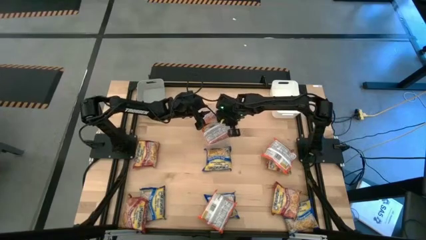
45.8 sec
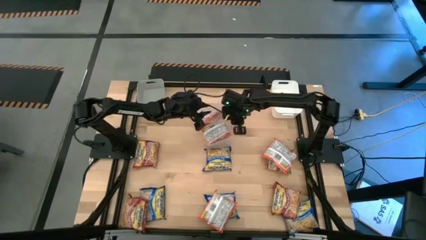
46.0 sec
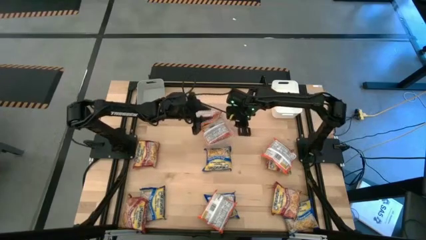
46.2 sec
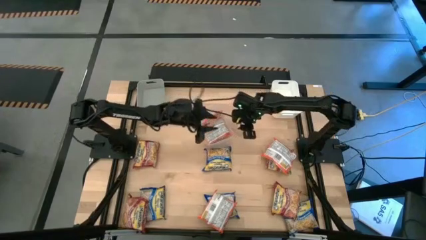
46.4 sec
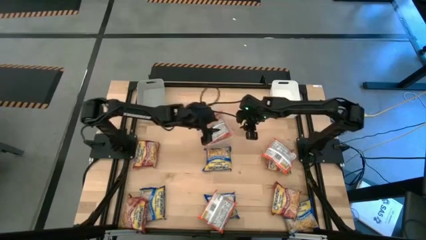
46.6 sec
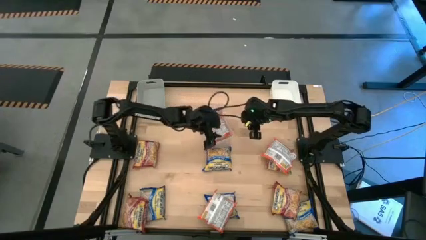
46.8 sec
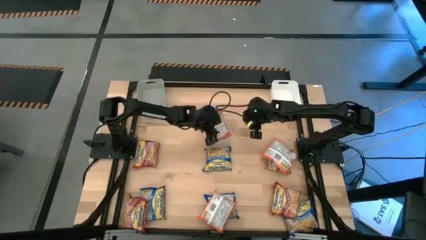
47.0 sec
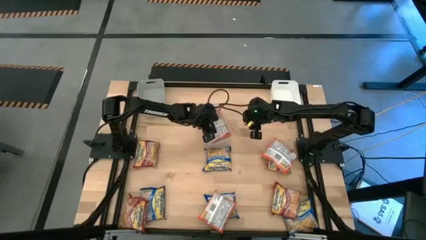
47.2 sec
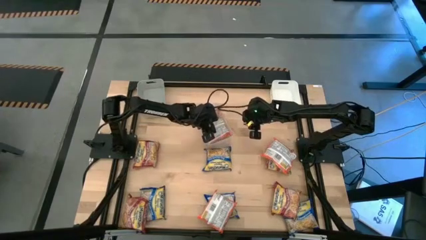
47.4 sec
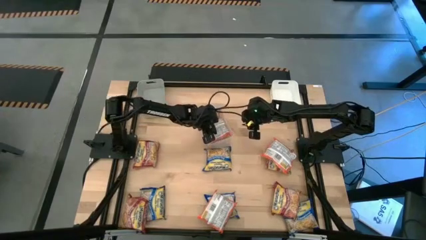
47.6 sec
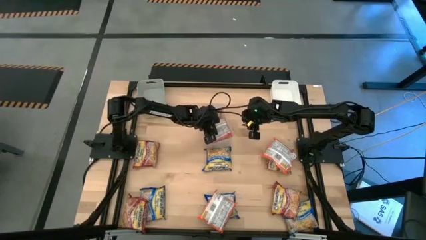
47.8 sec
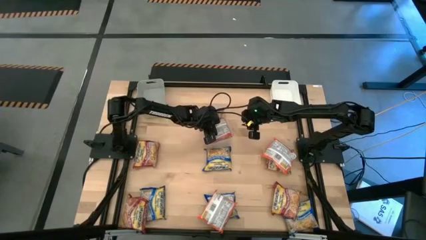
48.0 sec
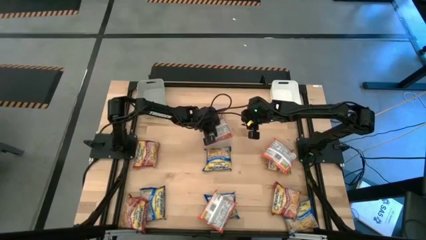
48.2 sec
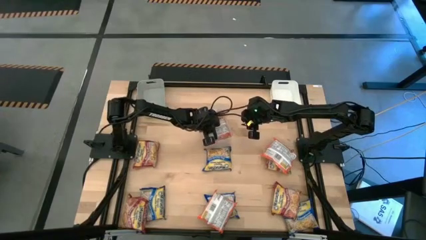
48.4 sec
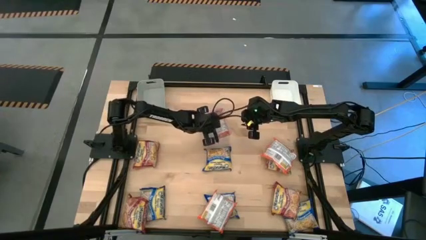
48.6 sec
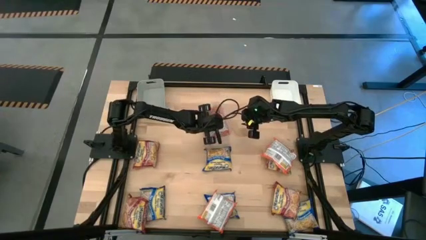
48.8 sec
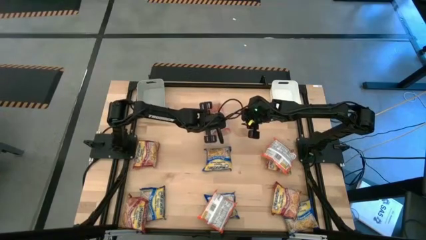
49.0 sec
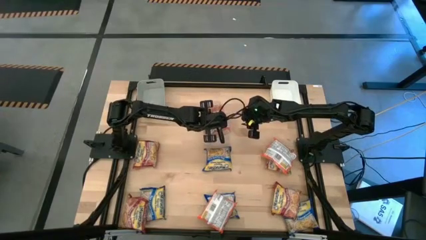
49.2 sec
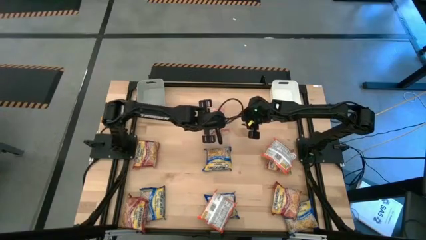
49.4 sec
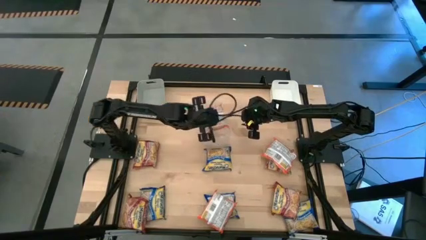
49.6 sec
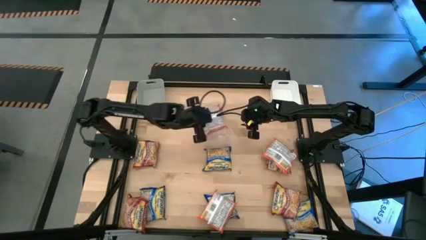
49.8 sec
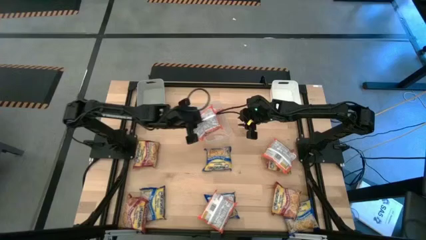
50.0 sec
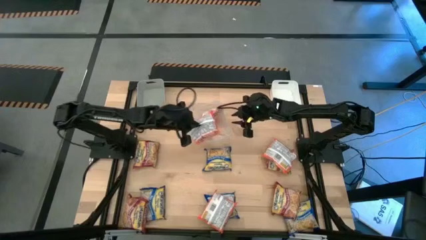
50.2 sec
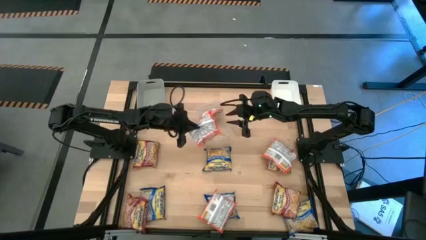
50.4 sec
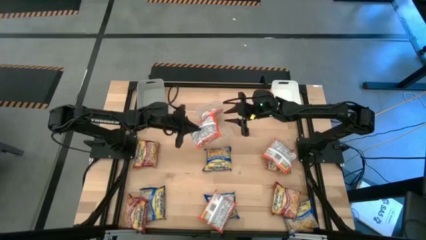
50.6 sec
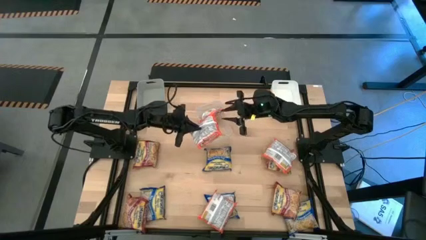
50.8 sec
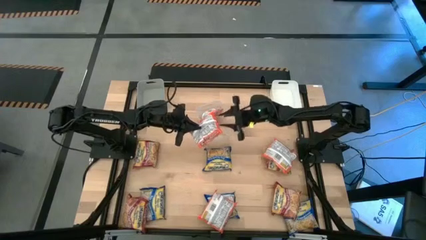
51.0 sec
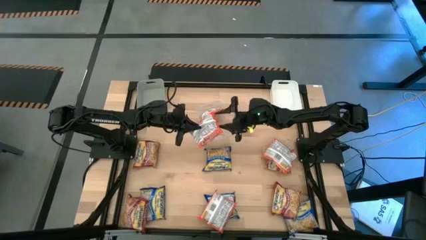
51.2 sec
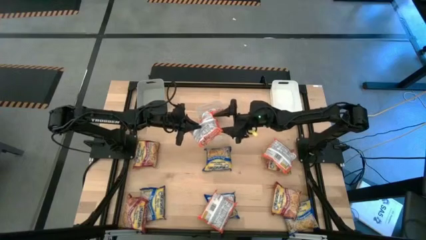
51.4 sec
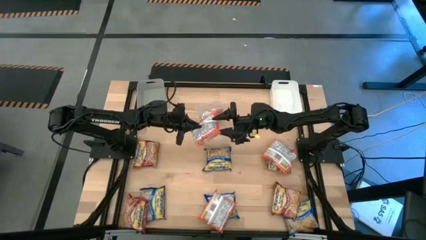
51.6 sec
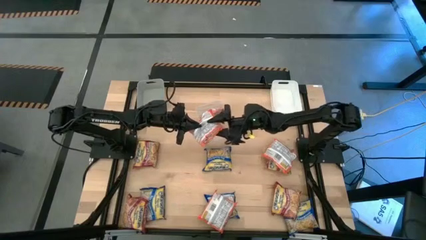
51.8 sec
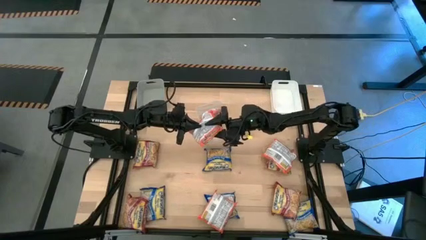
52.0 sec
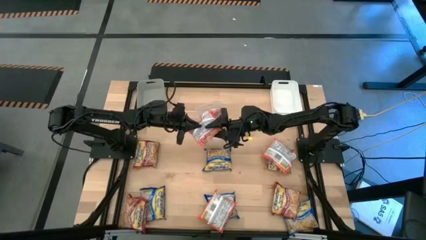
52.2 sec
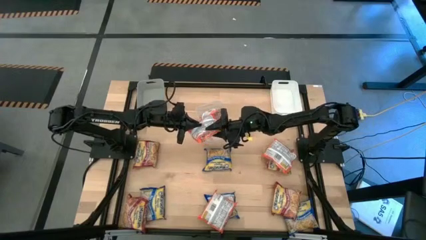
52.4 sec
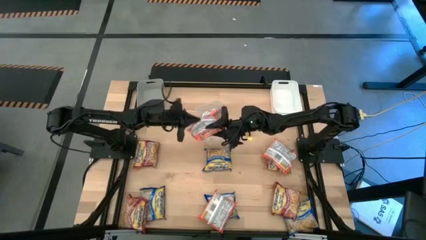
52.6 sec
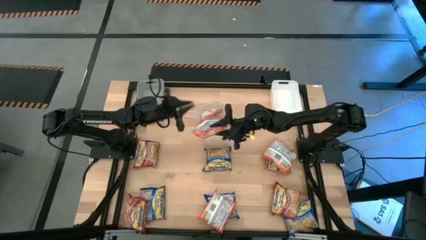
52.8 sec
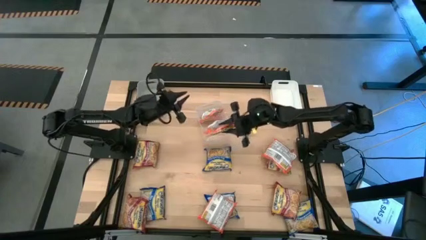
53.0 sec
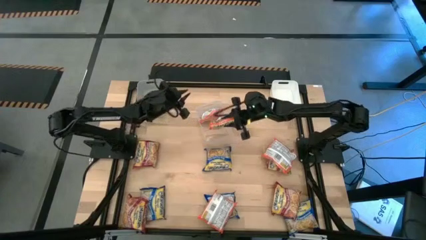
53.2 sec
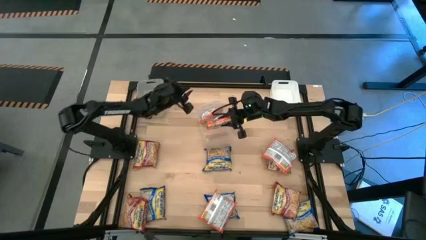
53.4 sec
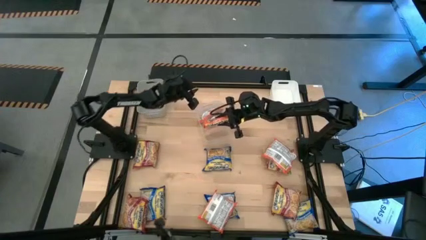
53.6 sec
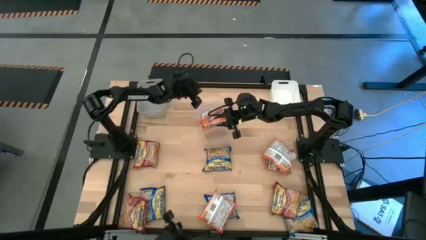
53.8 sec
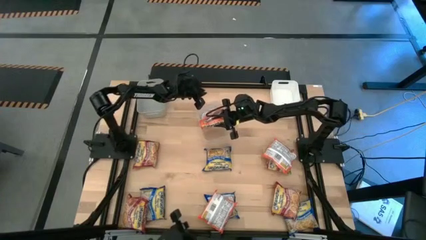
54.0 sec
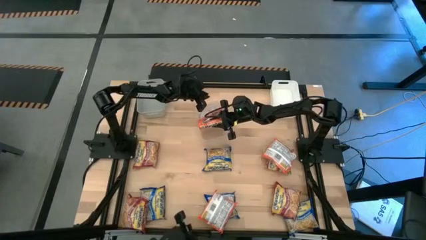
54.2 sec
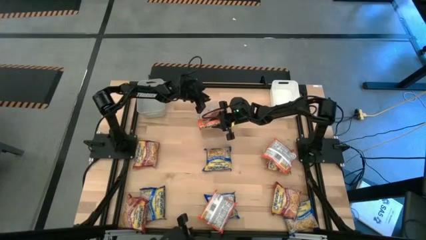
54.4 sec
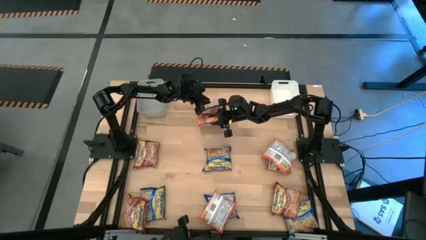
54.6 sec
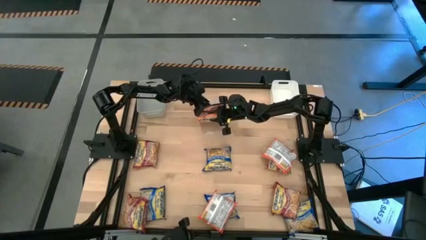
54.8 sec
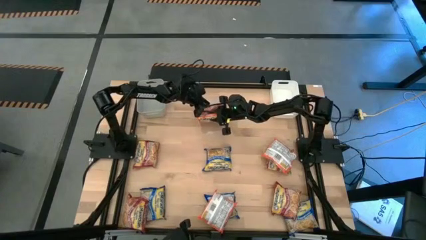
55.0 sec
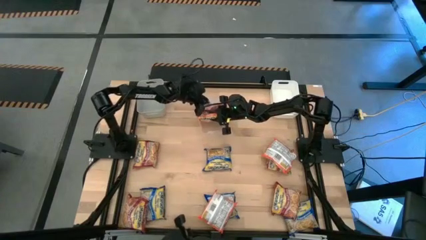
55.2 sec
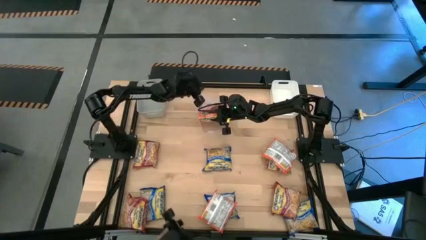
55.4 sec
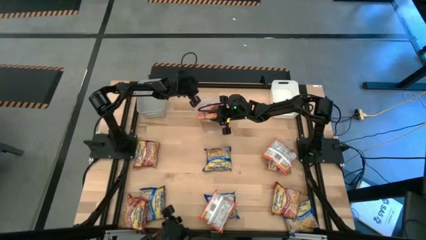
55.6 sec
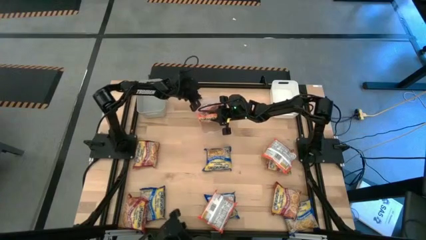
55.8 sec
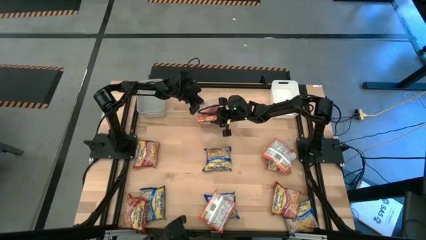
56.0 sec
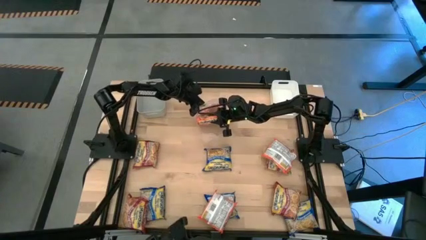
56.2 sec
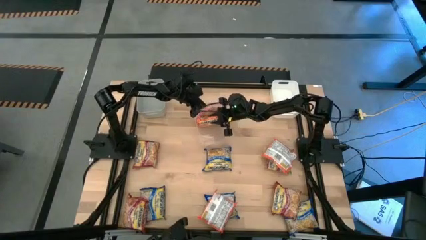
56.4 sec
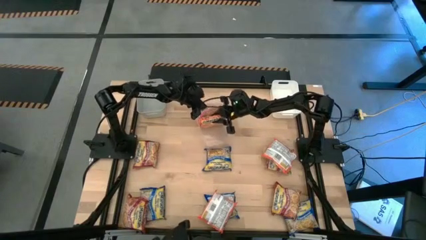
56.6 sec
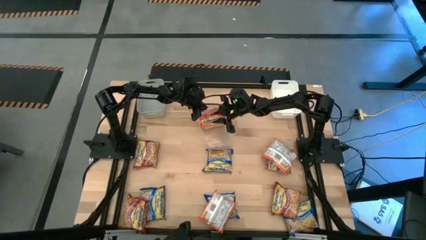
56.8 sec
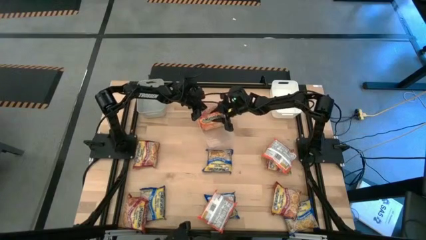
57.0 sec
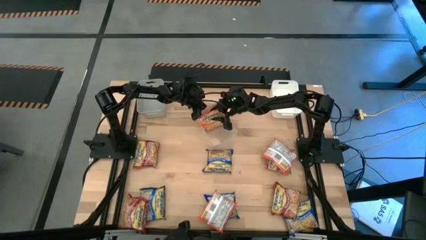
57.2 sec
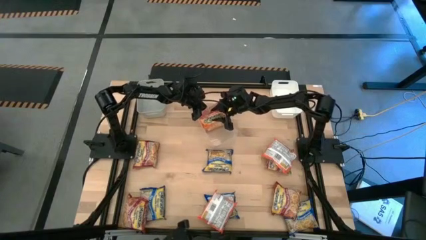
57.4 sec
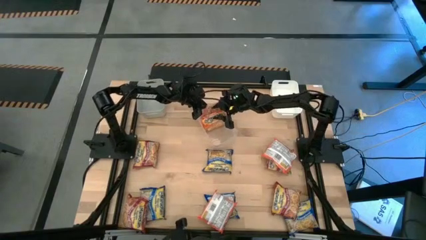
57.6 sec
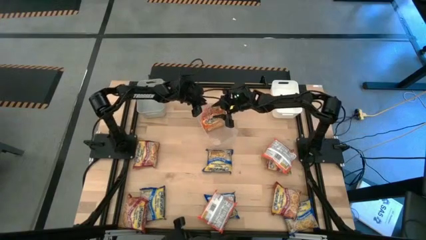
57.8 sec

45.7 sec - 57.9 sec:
Task: Sort Maruchan noodles
Adjust the orange noodle on the transparent bin

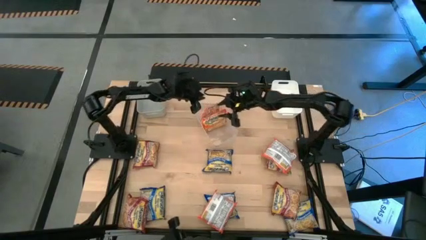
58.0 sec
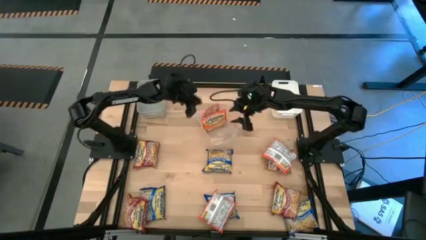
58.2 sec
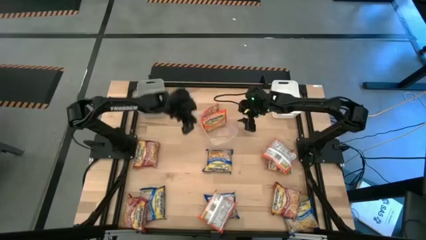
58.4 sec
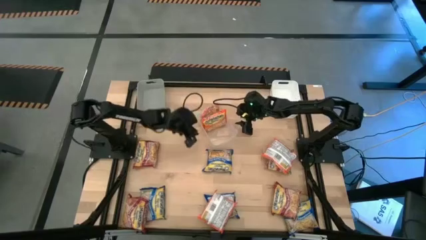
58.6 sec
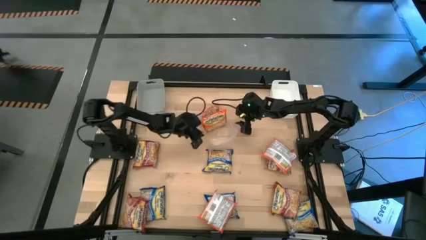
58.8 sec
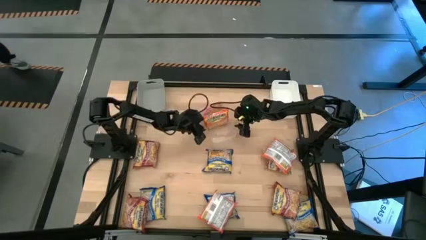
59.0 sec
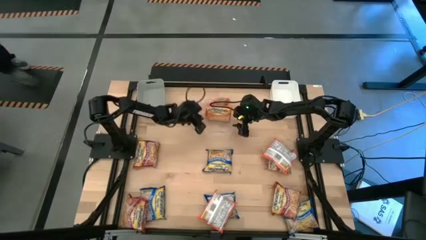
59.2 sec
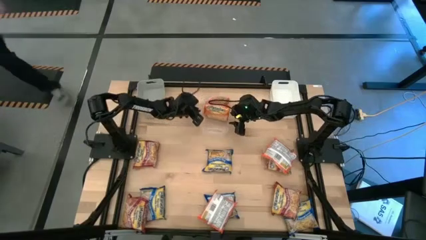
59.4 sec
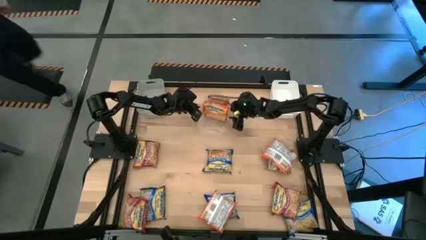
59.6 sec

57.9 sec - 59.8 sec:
Adjust the transparent bin

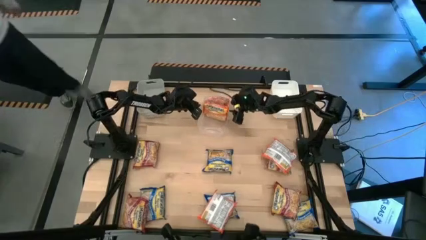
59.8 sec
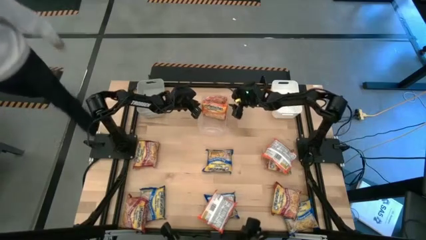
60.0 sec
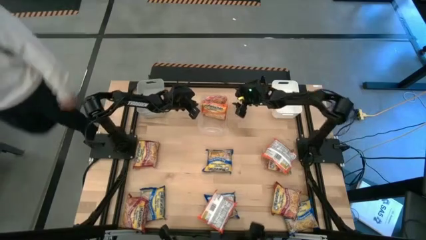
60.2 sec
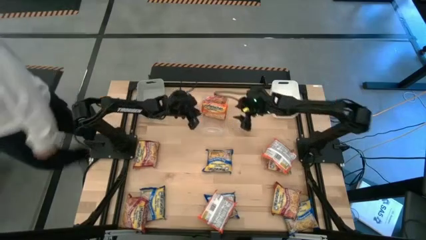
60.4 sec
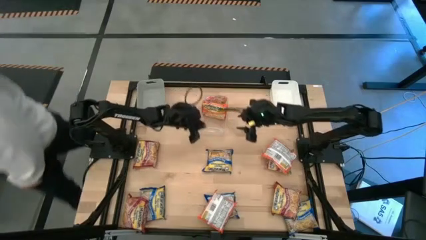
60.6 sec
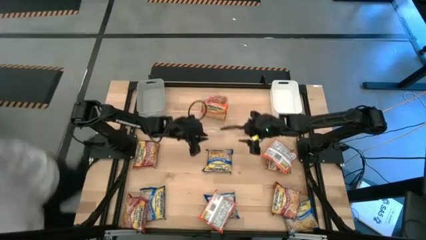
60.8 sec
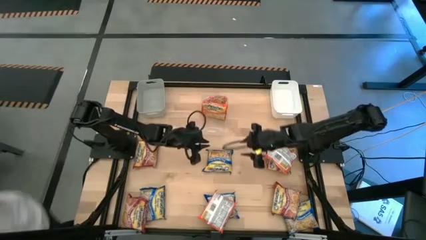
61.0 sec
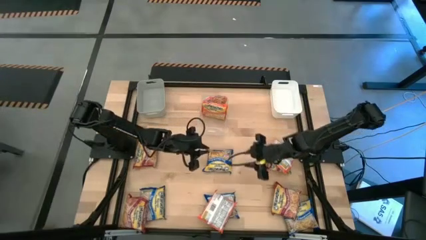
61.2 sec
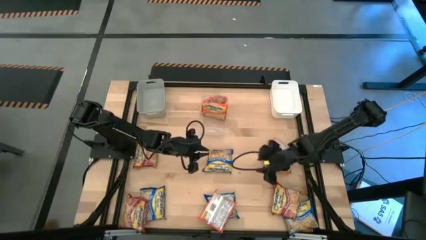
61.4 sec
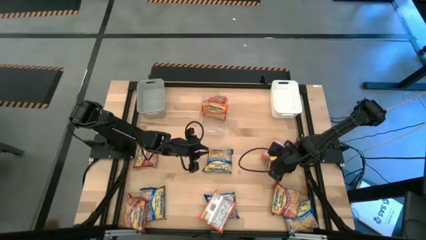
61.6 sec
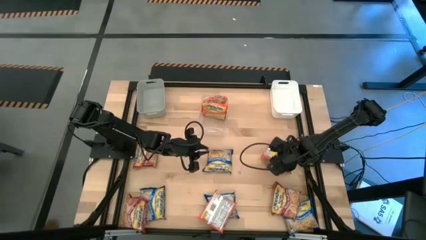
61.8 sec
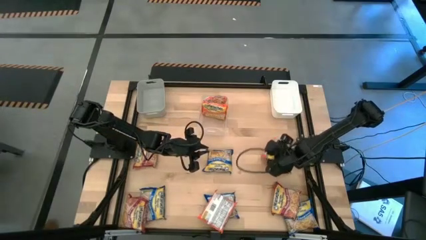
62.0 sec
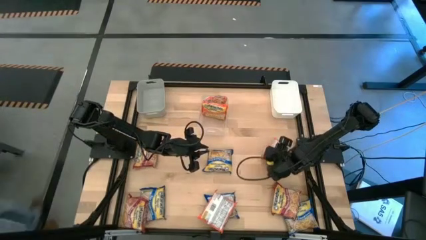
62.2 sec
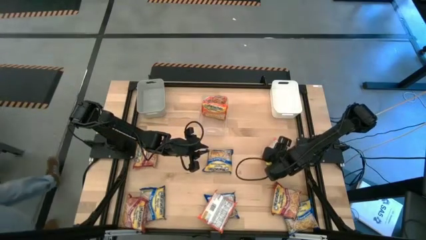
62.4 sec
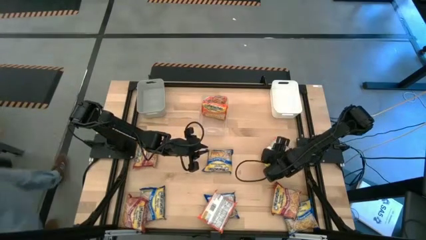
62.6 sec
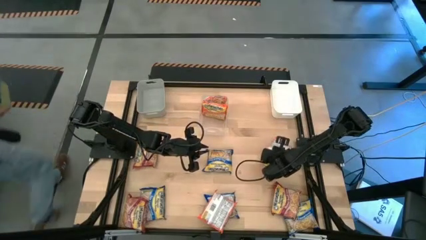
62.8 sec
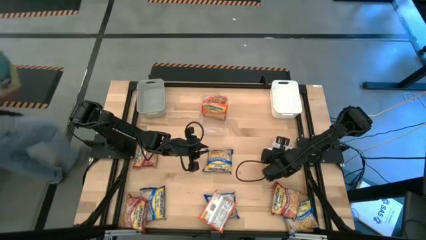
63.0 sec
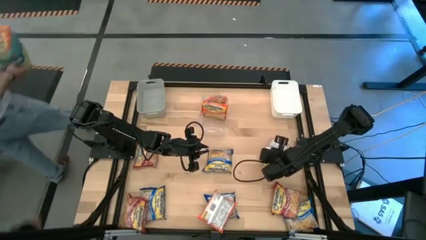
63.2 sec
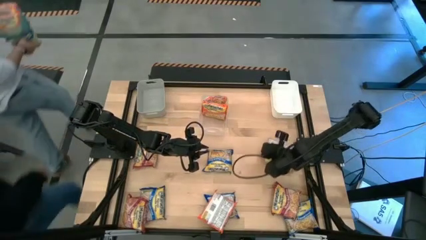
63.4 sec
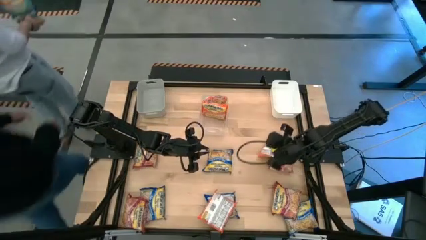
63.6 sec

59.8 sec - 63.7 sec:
Put the top orange noodle into the transparent bin
